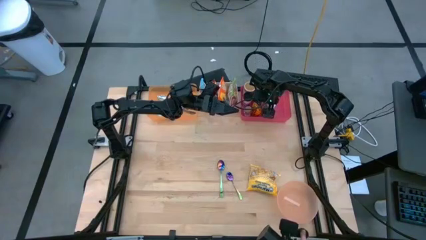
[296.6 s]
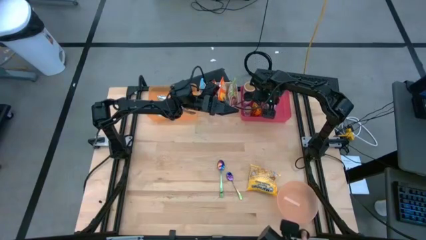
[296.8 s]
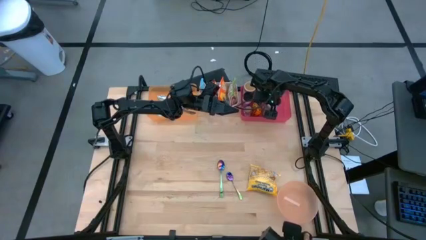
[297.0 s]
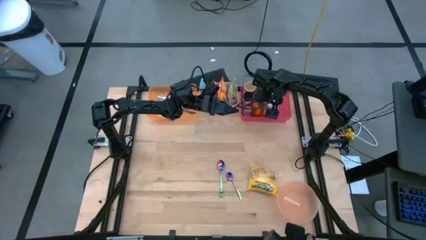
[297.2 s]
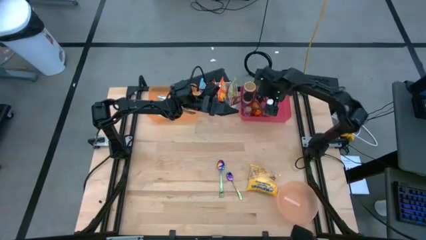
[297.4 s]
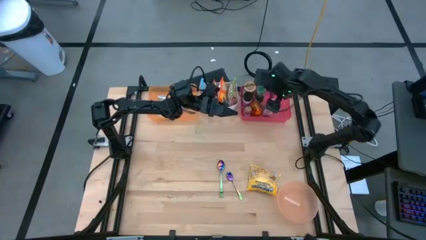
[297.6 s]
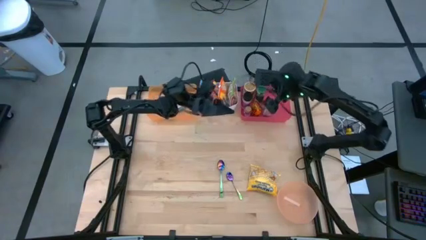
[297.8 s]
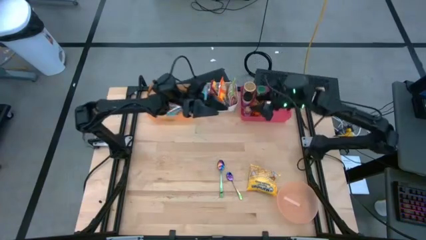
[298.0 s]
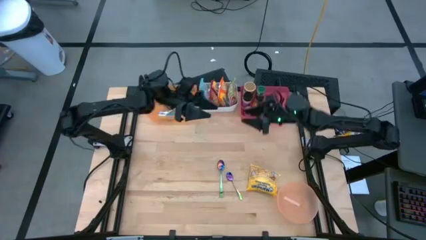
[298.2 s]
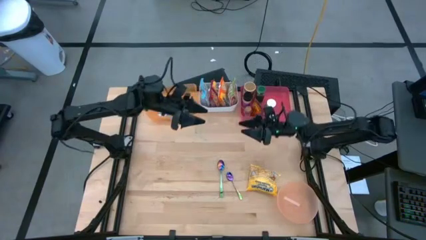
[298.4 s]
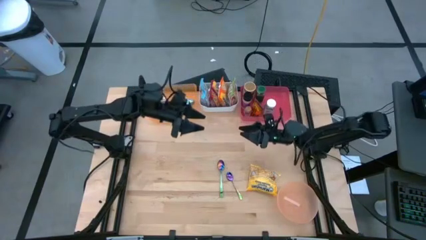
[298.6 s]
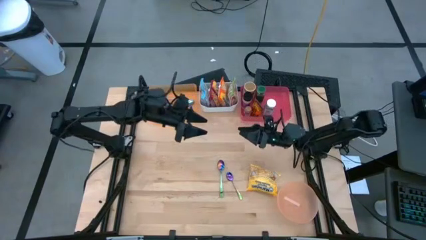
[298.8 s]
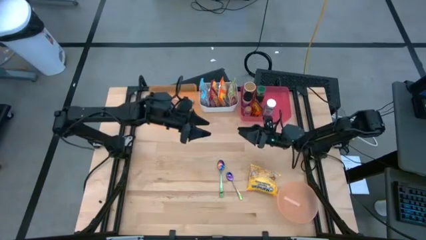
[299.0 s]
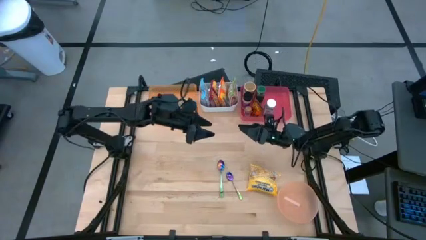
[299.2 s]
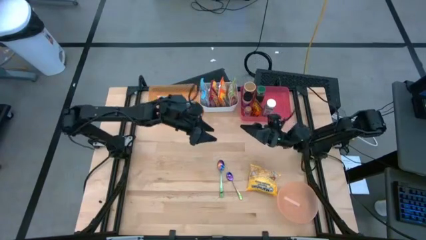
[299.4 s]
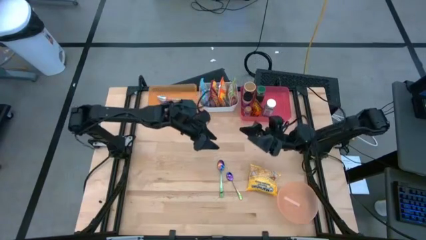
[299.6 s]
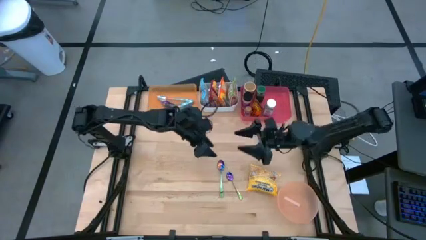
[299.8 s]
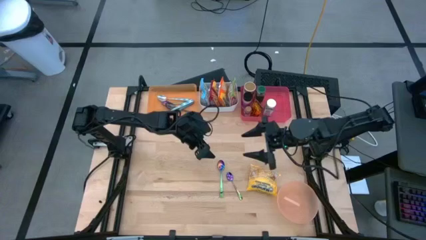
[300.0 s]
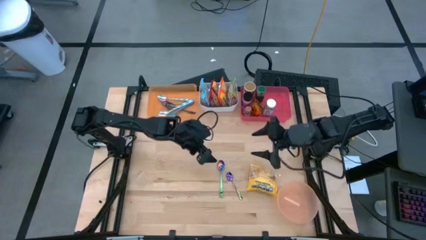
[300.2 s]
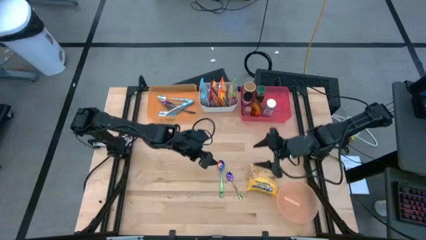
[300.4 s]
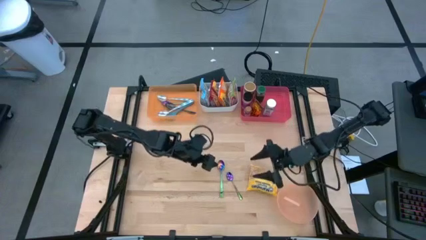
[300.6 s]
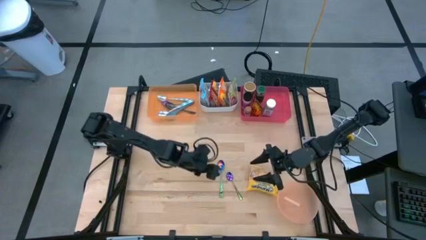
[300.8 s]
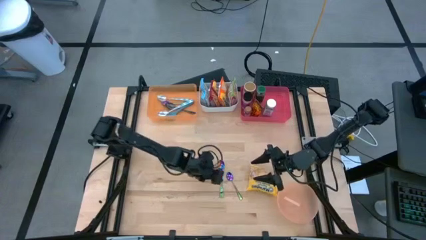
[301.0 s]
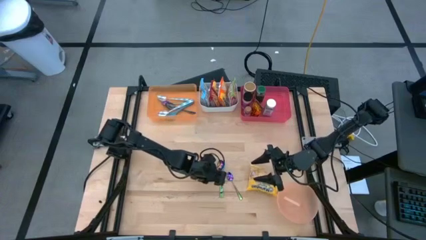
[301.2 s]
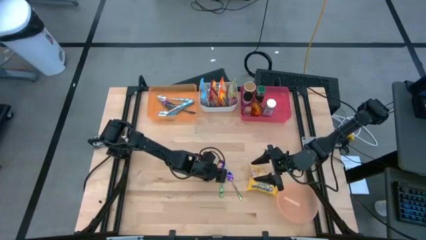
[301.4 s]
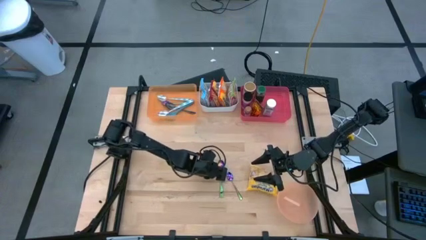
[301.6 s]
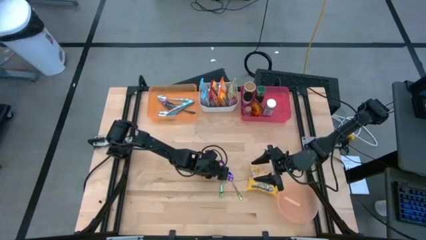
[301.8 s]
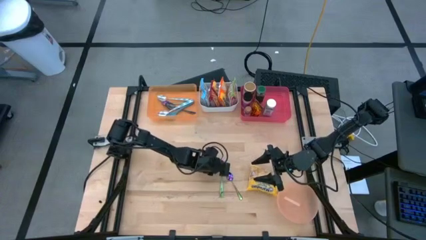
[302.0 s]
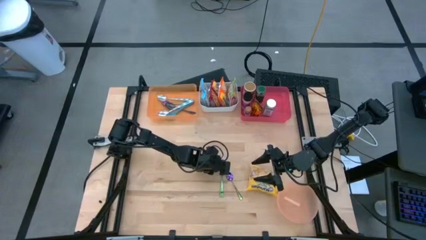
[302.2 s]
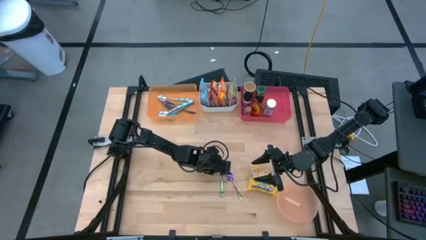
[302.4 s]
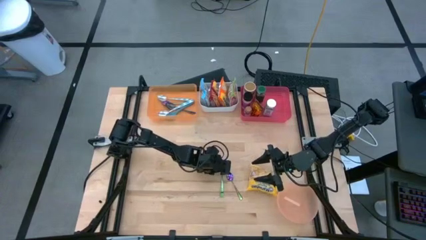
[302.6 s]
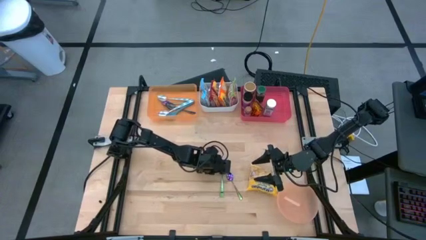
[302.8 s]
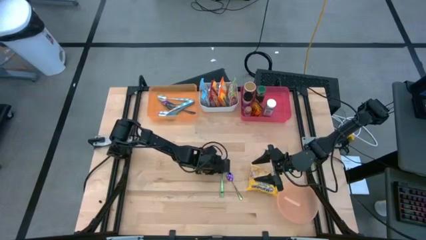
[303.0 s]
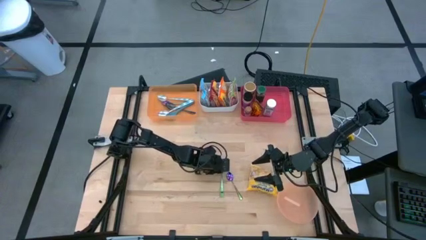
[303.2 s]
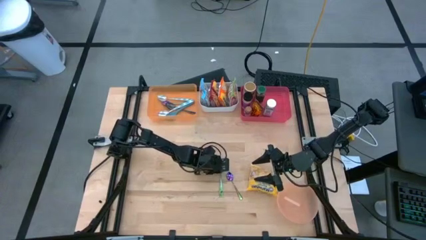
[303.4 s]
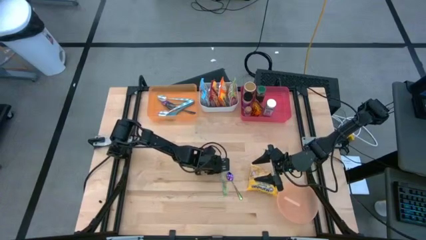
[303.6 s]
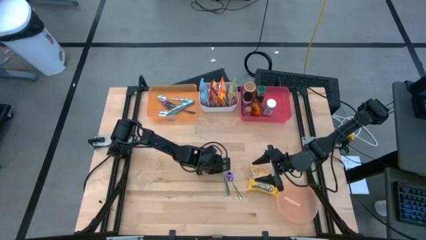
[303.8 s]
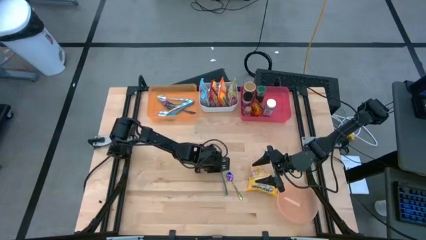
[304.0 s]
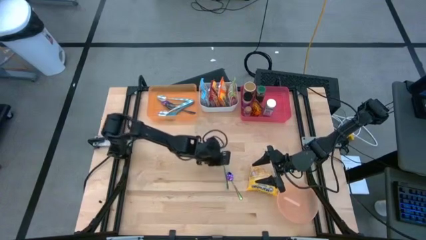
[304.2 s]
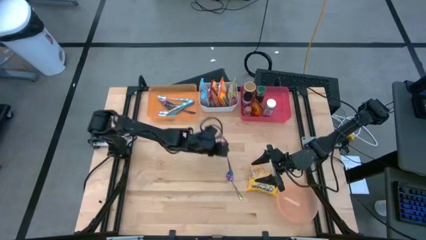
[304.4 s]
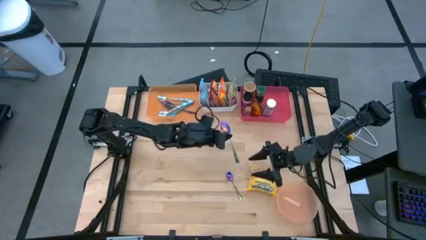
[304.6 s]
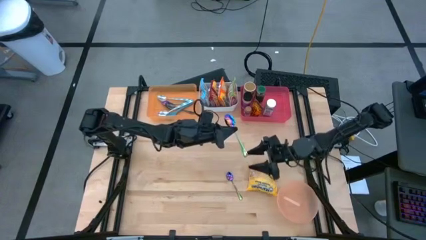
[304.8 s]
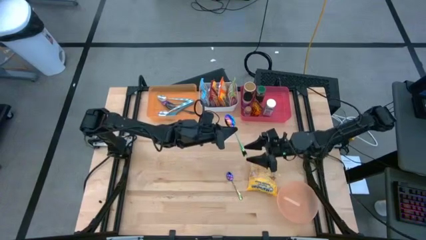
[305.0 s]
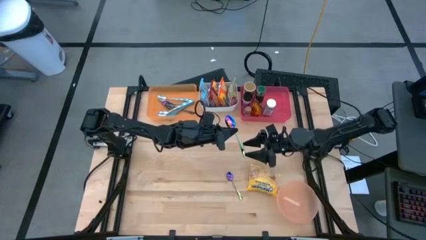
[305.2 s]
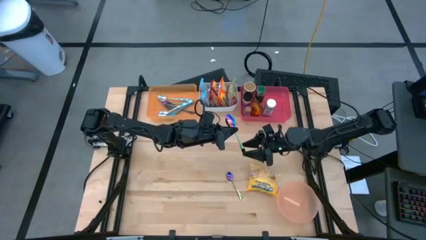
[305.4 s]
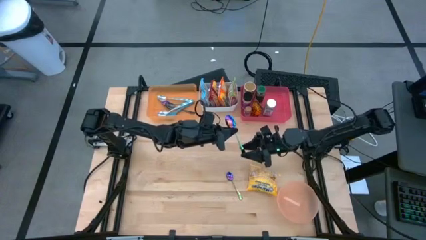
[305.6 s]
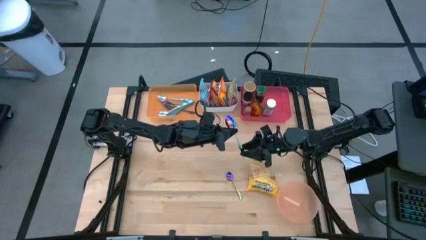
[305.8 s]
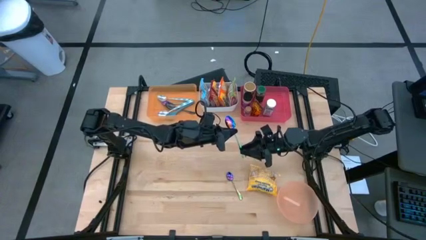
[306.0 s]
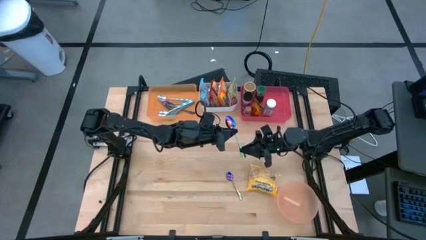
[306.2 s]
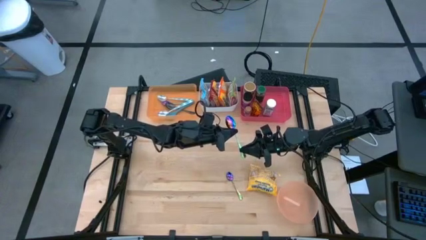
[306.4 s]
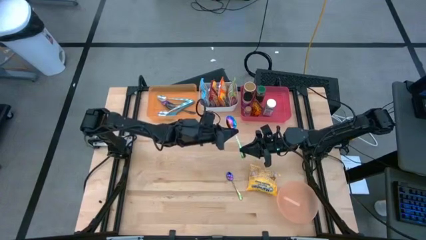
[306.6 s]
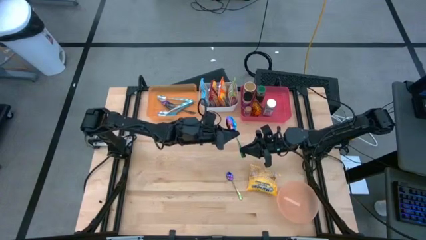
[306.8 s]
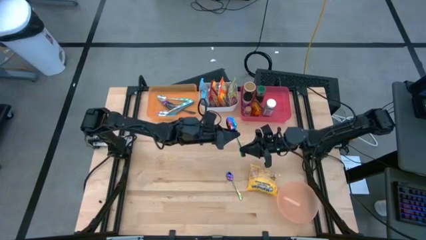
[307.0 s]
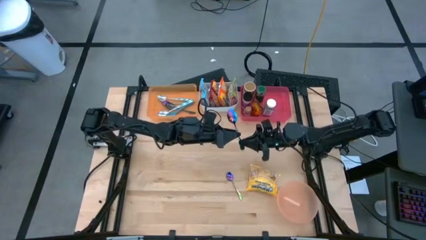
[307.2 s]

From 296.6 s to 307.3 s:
Task: Pick & Place Food Item
Put the left violet and green spoon into the orange bin
